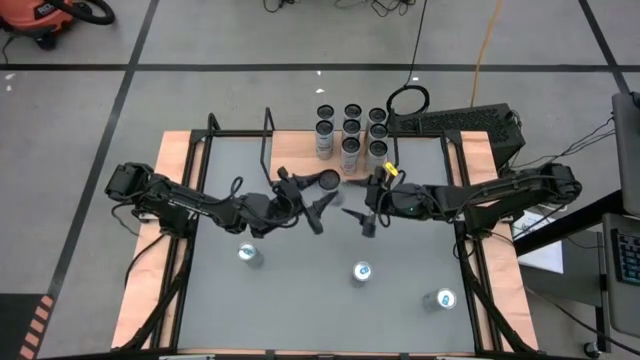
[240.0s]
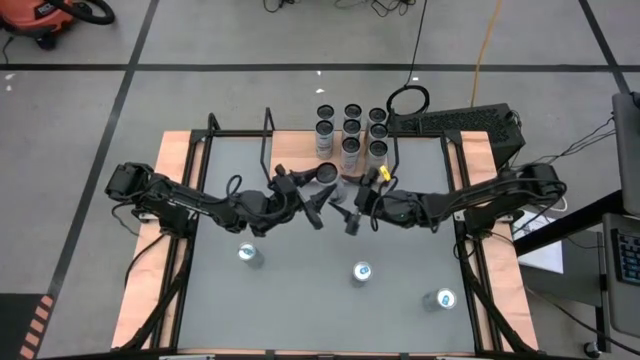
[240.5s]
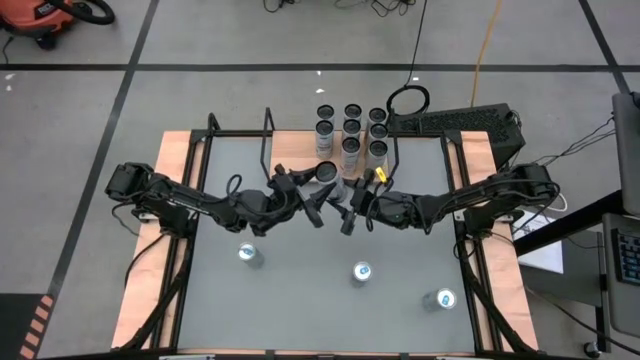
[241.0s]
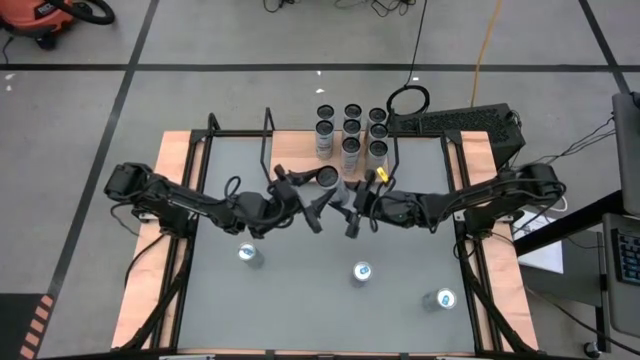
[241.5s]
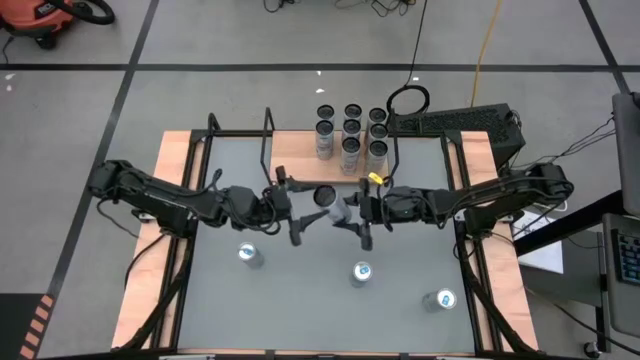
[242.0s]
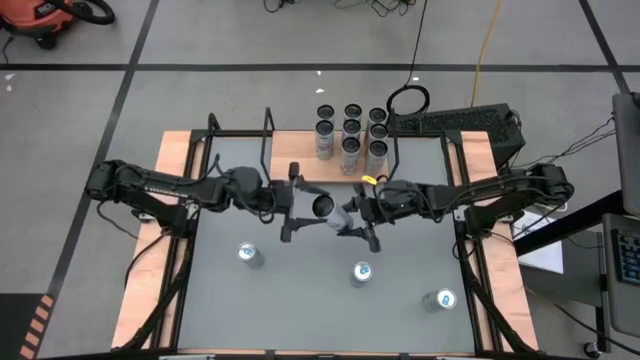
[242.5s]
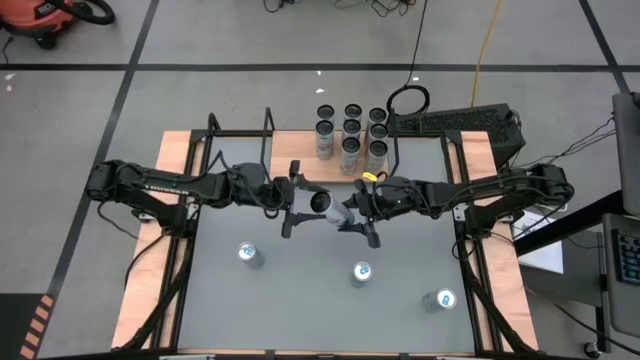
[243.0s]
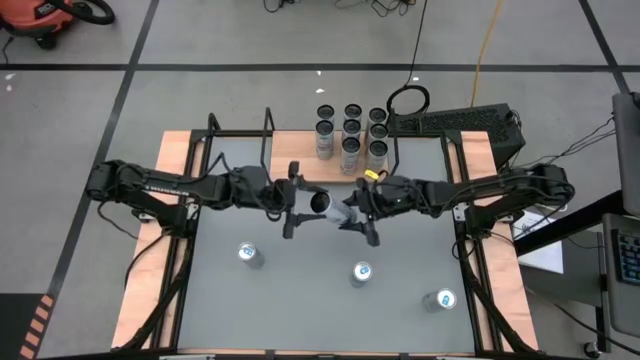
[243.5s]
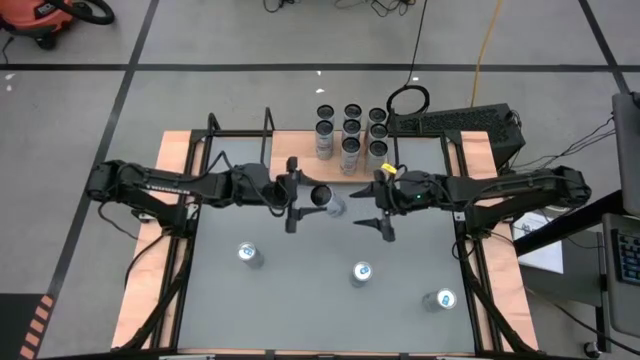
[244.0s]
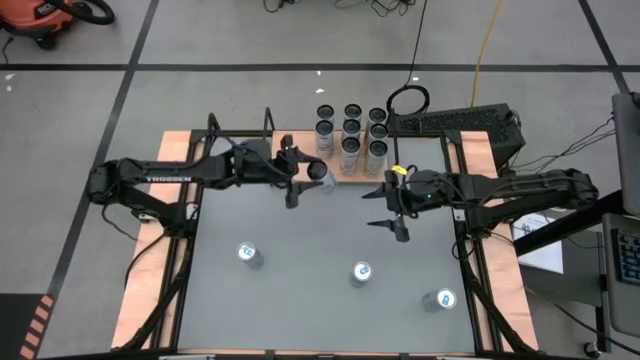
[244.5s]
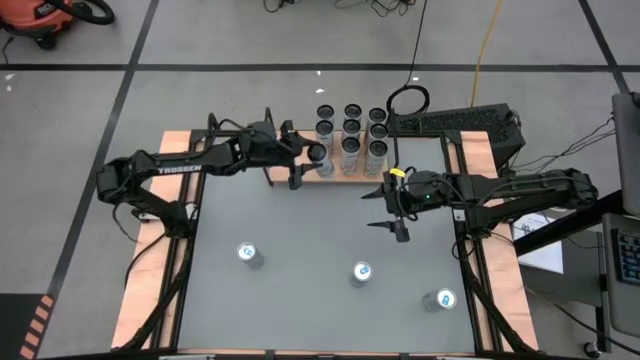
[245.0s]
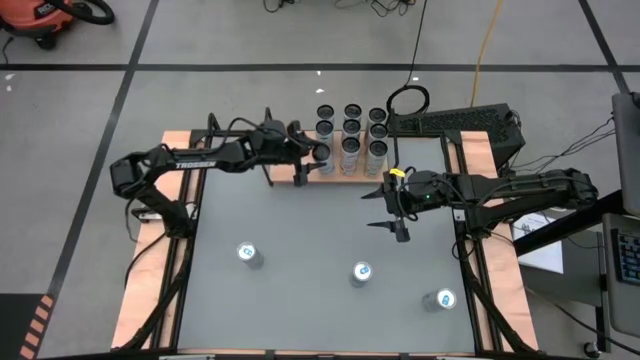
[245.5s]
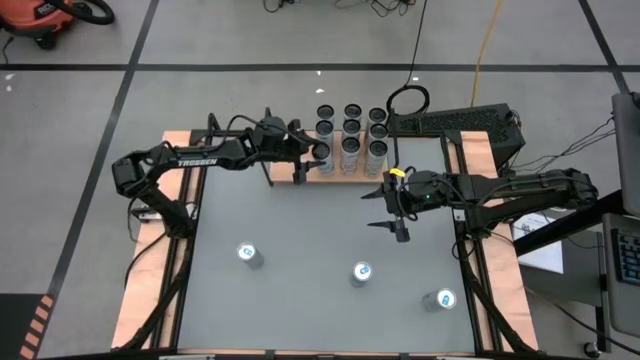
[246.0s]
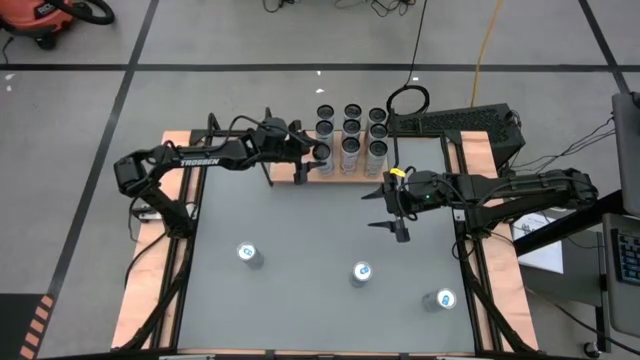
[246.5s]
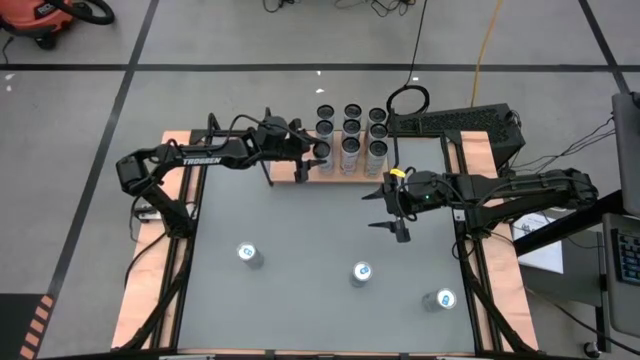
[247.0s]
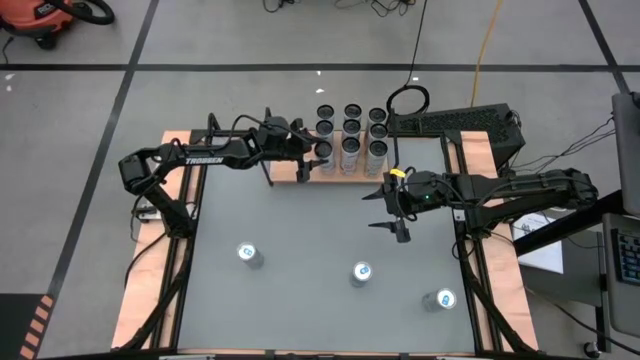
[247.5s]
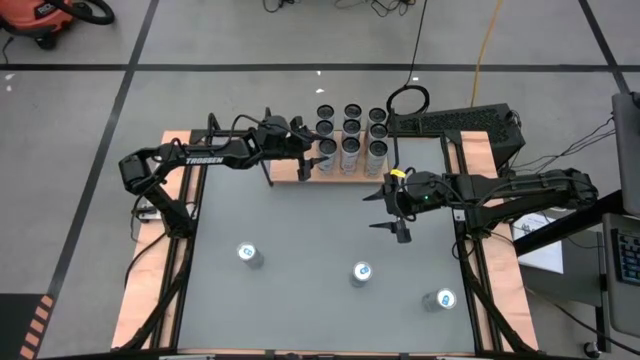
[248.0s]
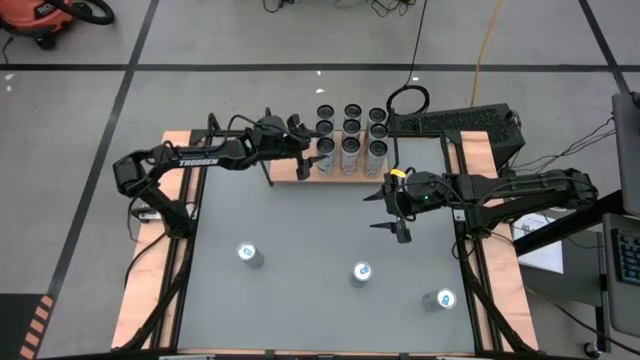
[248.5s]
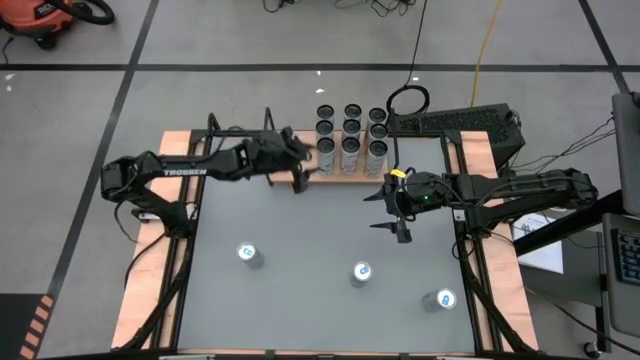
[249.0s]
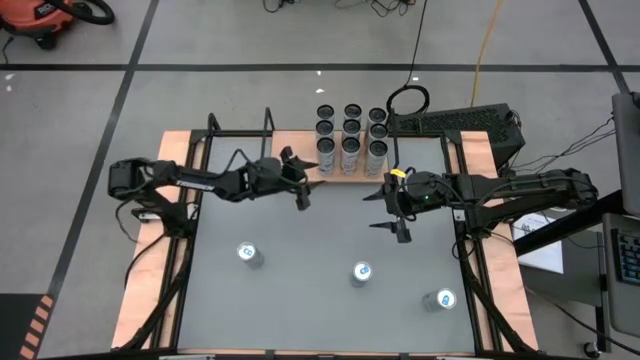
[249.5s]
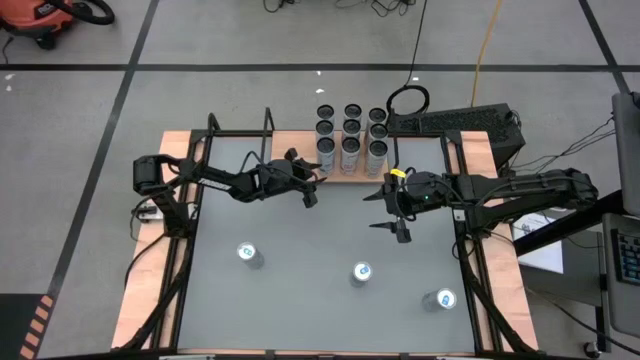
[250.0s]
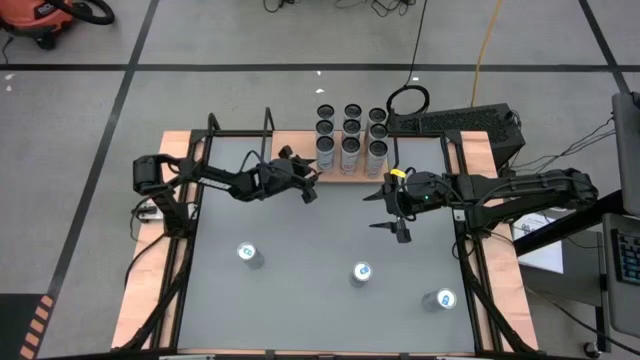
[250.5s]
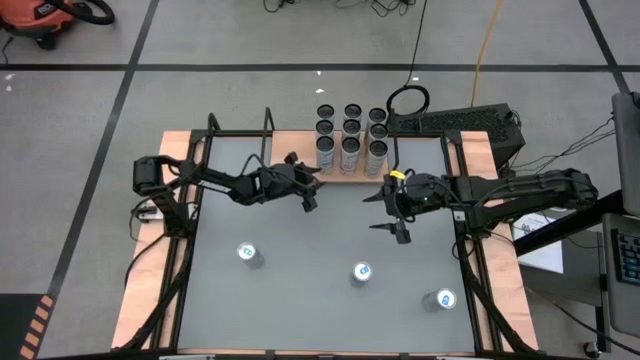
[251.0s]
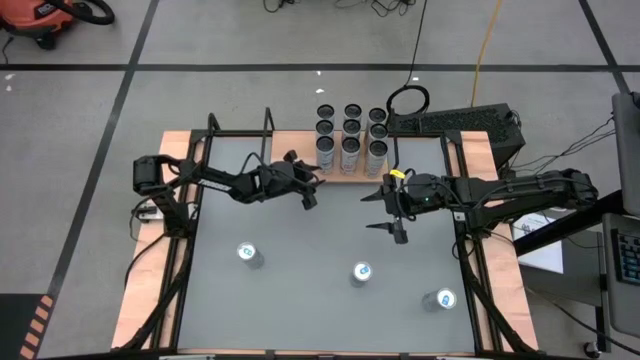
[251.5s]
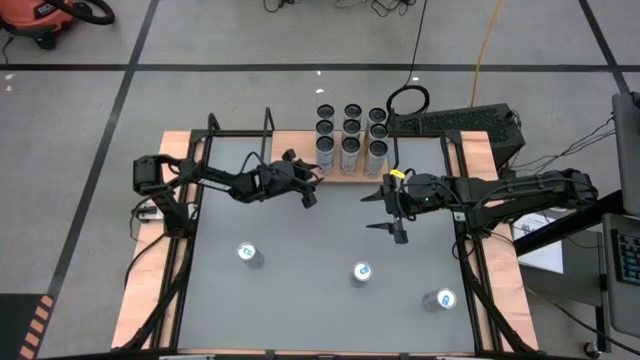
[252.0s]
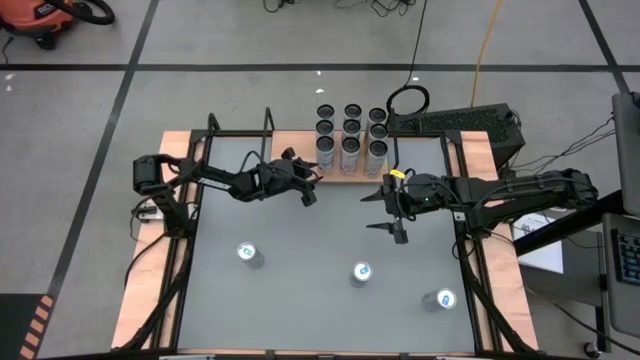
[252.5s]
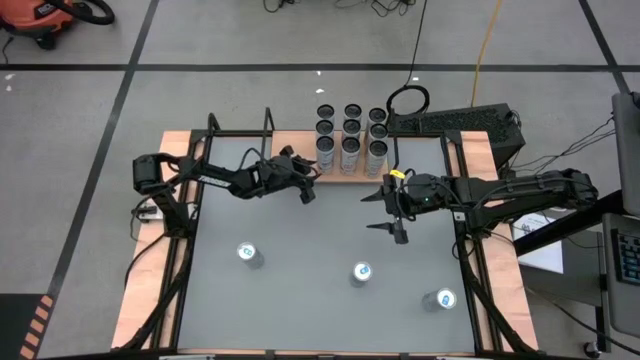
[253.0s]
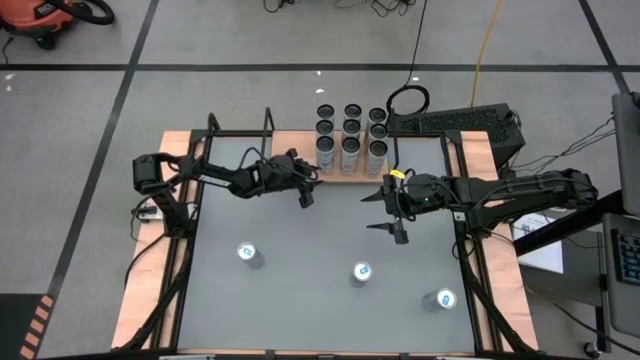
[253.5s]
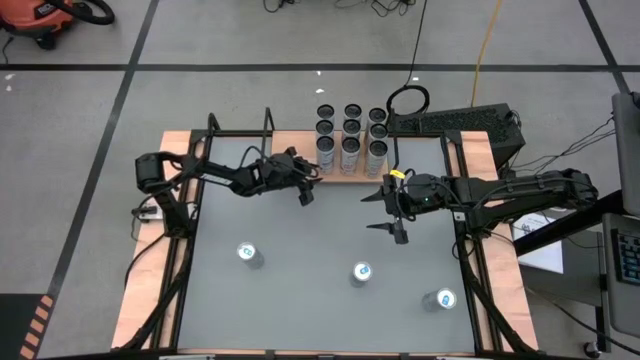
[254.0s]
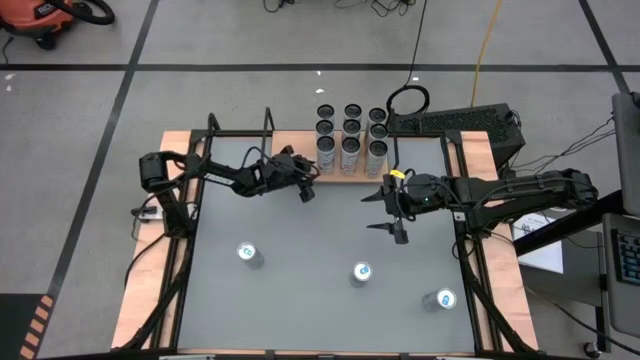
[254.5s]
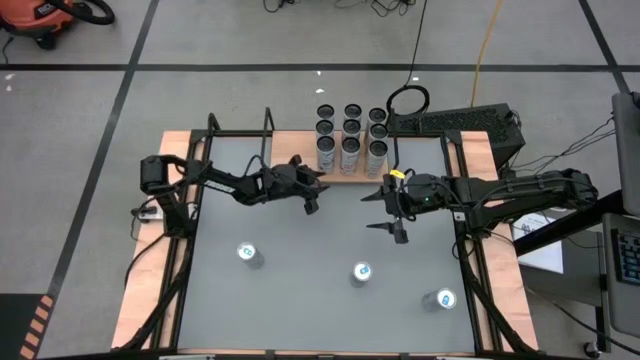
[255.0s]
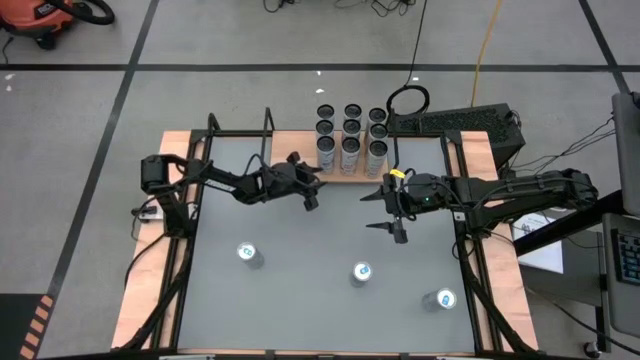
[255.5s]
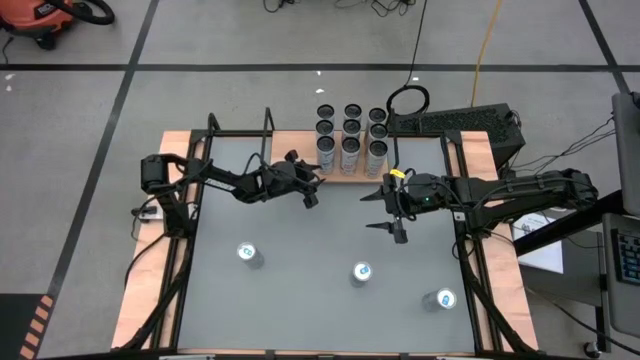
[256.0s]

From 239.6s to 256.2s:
Task: Place canned beverage on shelf
Put the white blue soda can on the shelf aligned with the white blue soda cans

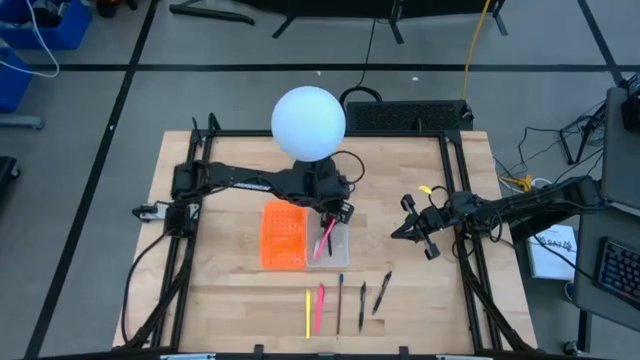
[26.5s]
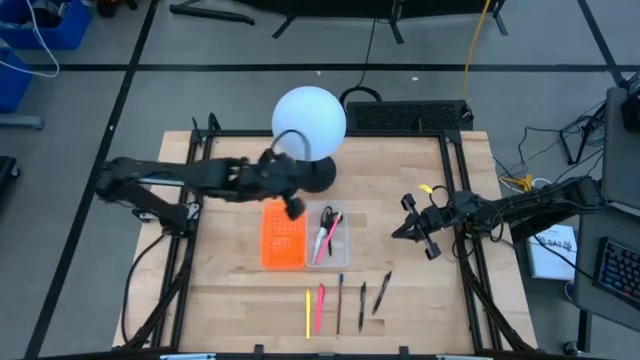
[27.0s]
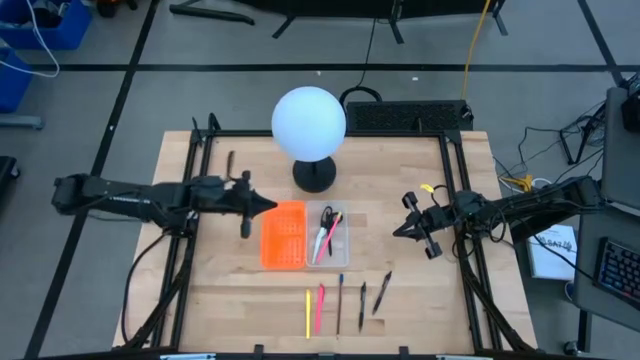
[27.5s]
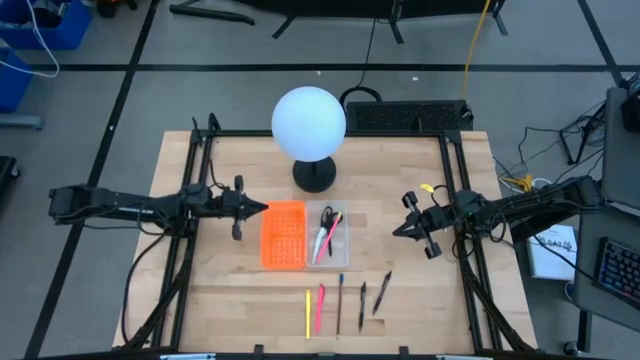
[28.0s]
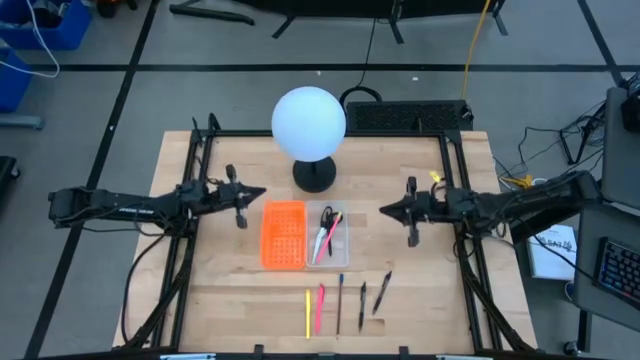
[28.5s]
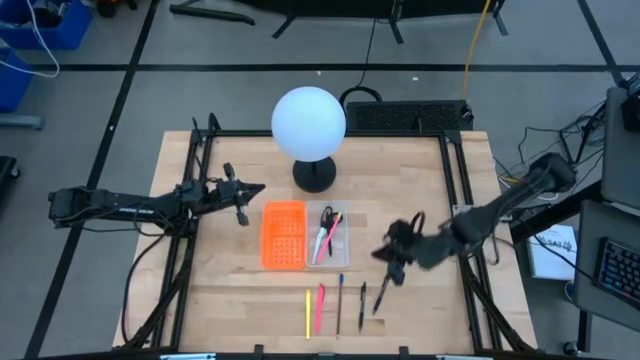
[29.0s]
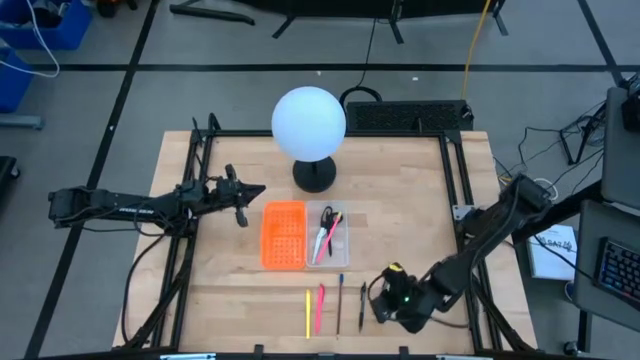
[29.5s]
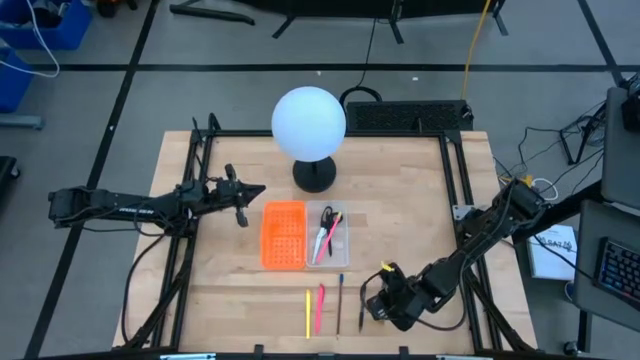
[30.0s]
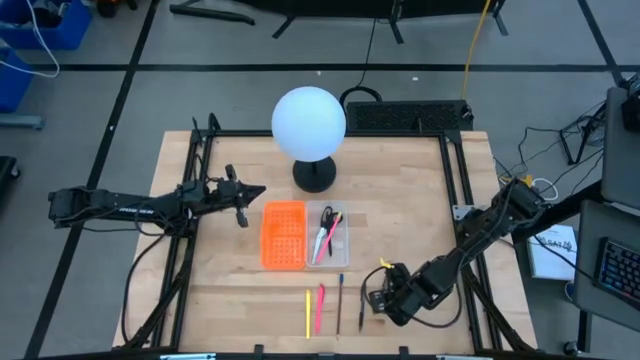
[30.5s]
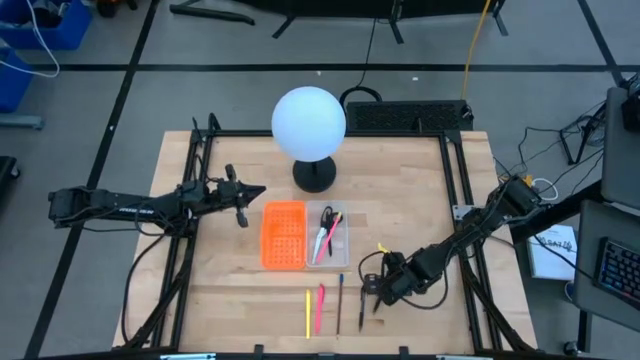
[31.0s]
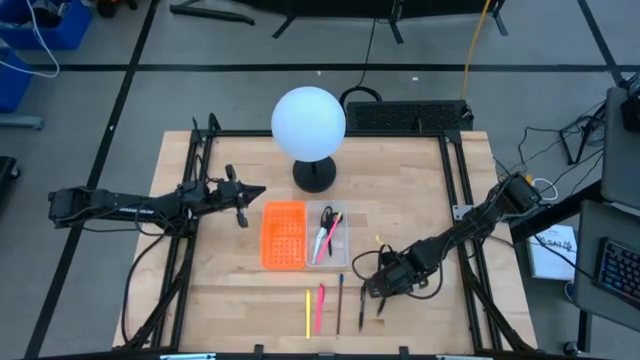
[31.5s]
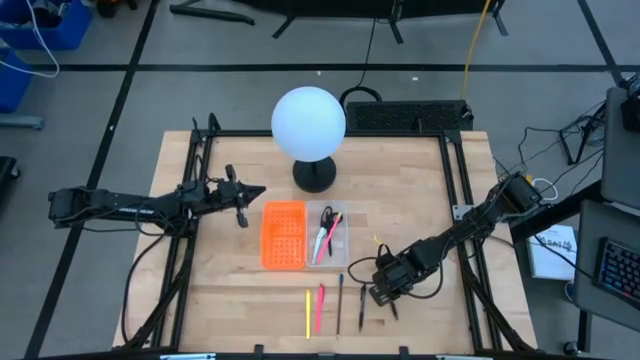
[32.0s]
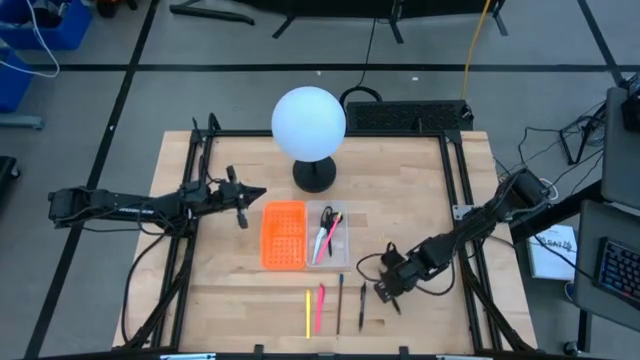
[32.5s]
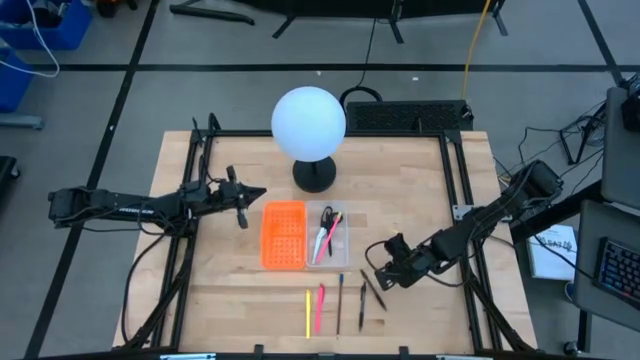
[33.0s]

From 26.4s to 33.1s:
Task: Pick & place school supplies into a supply box
Put the right black pen into the pencil box
